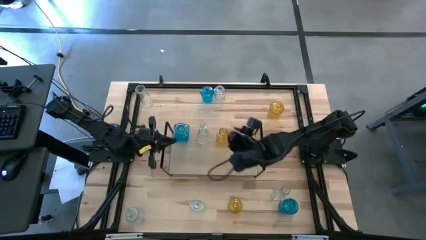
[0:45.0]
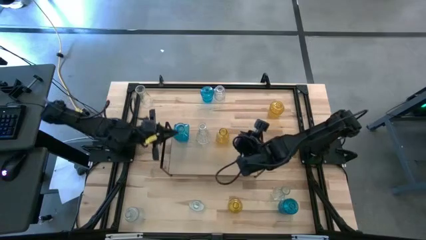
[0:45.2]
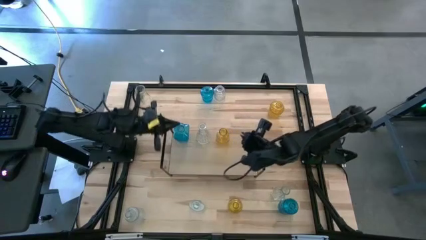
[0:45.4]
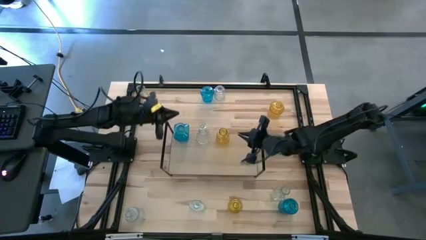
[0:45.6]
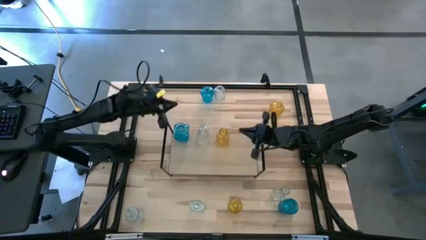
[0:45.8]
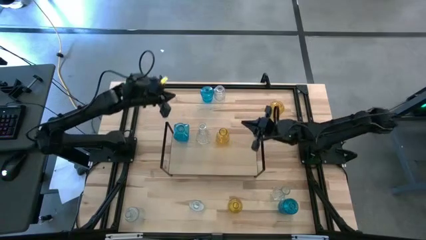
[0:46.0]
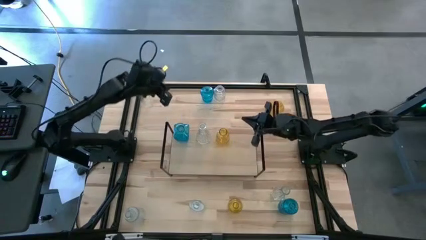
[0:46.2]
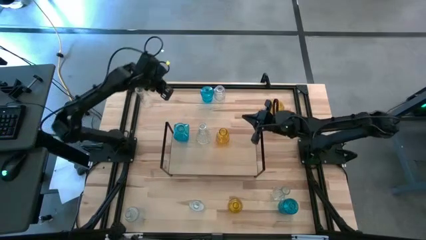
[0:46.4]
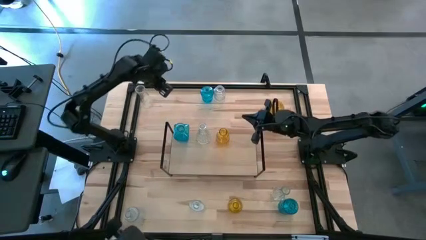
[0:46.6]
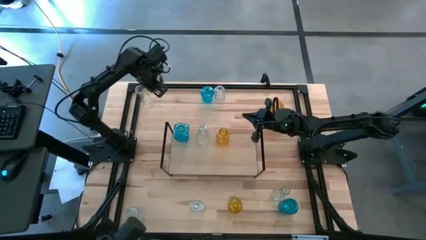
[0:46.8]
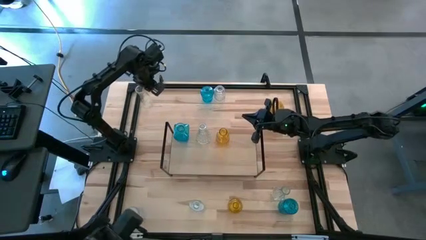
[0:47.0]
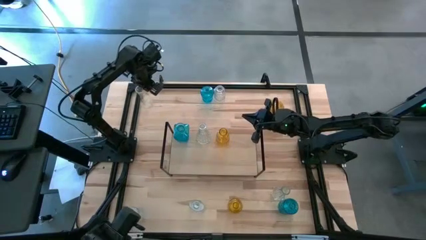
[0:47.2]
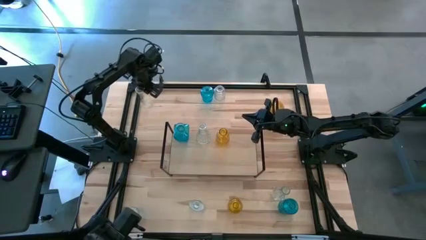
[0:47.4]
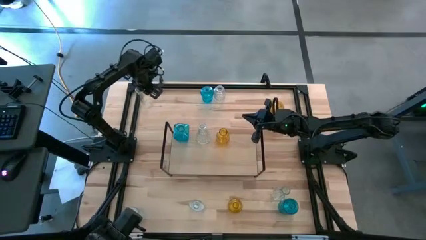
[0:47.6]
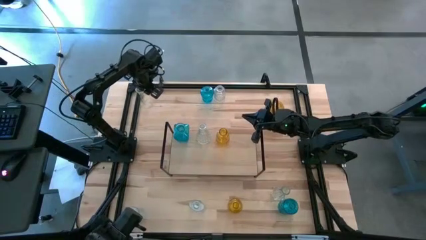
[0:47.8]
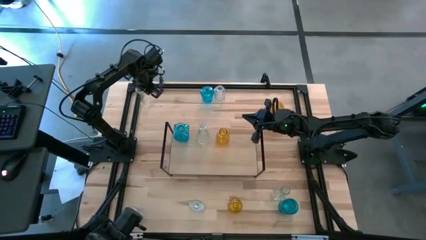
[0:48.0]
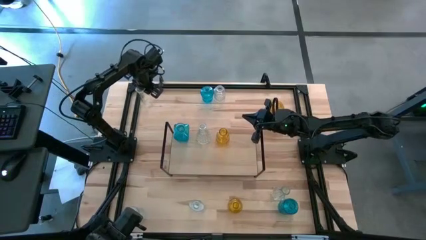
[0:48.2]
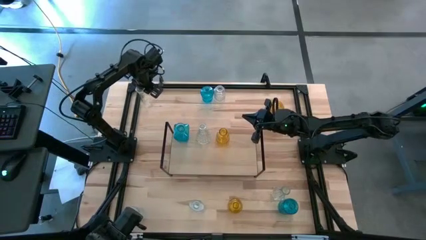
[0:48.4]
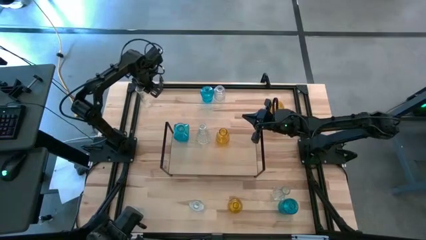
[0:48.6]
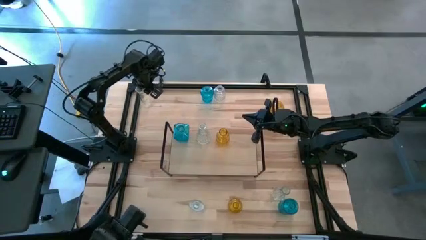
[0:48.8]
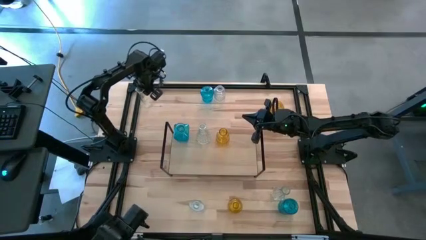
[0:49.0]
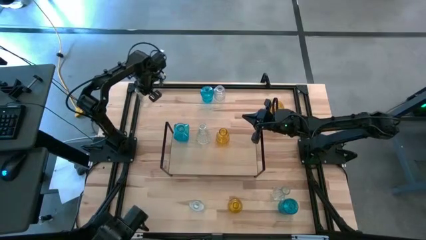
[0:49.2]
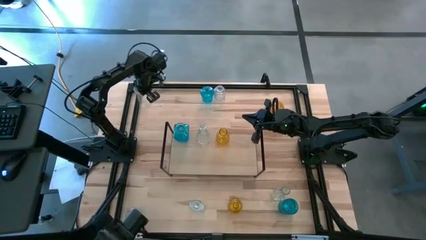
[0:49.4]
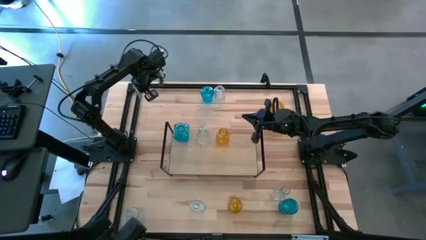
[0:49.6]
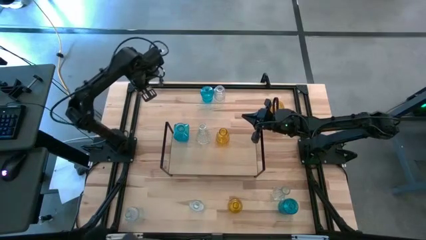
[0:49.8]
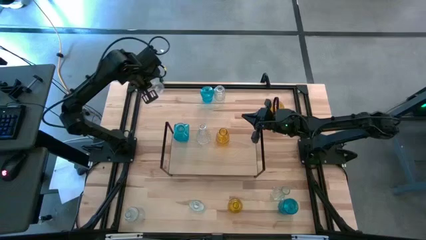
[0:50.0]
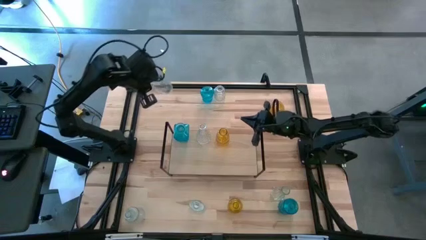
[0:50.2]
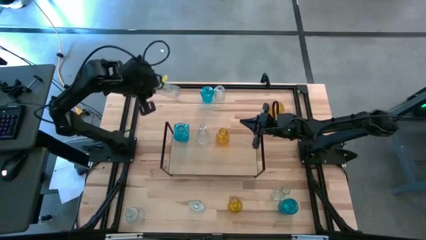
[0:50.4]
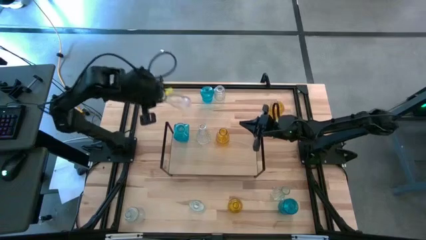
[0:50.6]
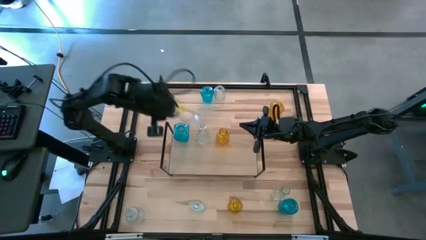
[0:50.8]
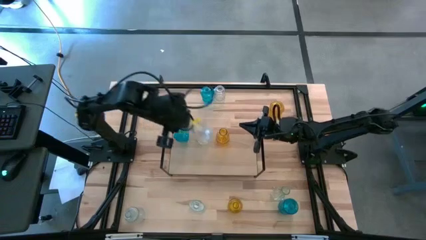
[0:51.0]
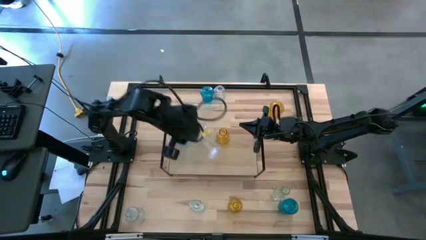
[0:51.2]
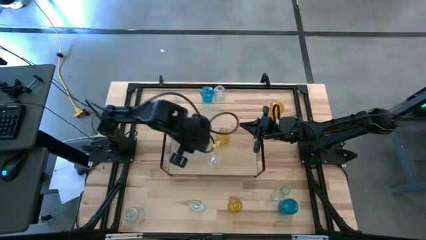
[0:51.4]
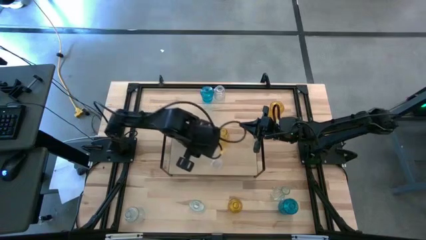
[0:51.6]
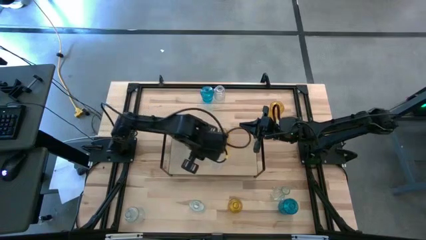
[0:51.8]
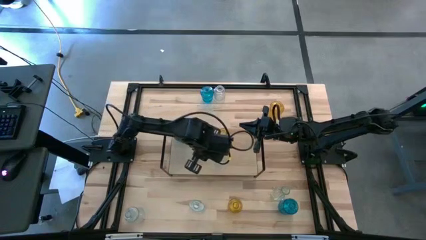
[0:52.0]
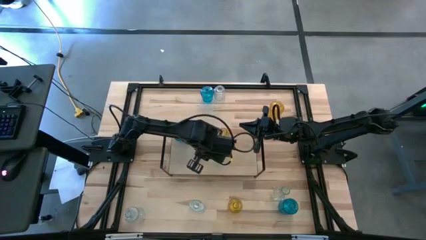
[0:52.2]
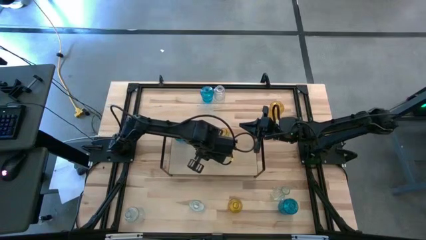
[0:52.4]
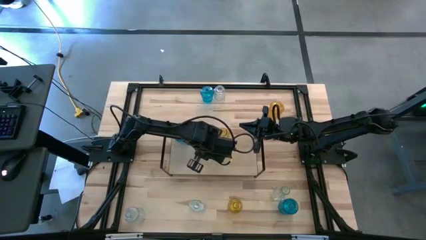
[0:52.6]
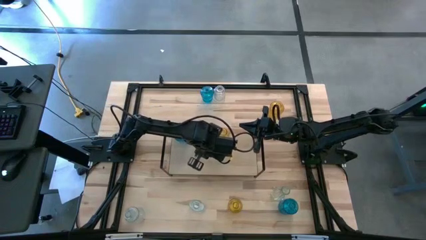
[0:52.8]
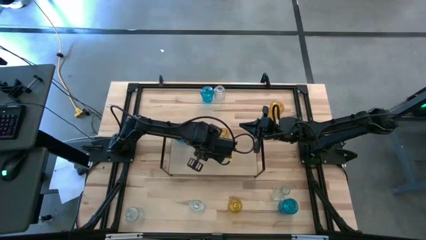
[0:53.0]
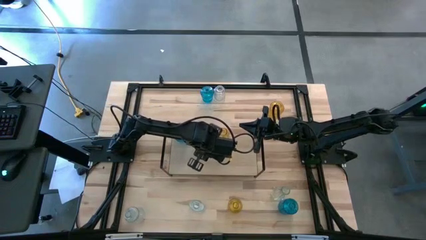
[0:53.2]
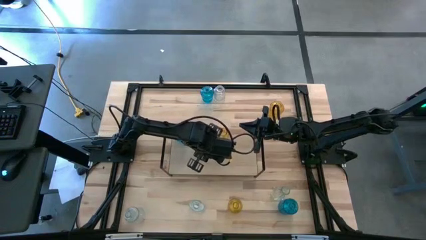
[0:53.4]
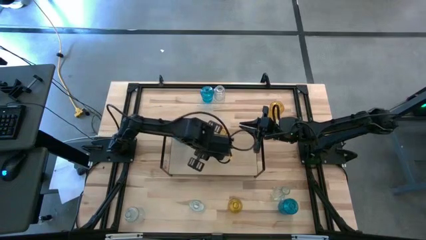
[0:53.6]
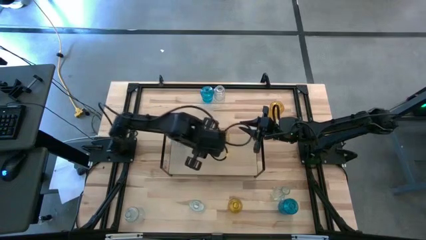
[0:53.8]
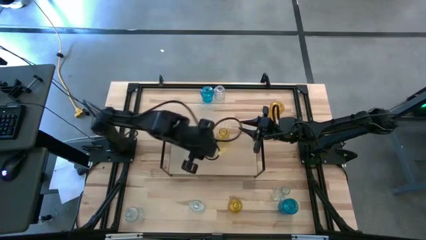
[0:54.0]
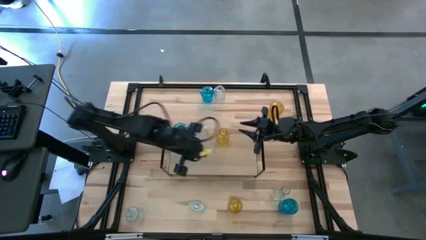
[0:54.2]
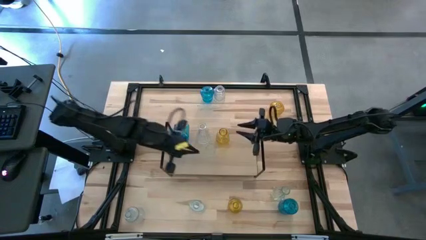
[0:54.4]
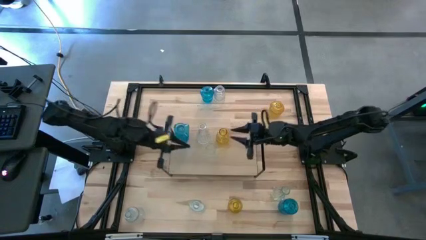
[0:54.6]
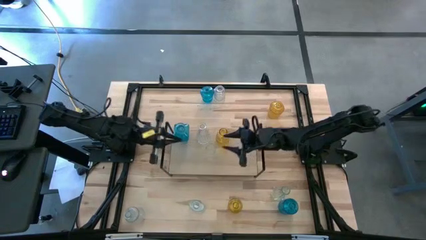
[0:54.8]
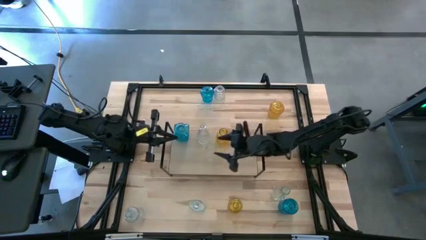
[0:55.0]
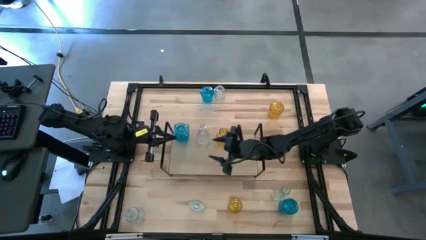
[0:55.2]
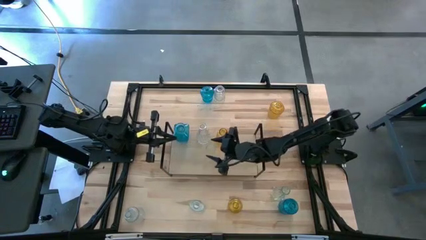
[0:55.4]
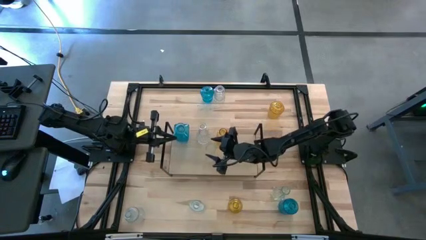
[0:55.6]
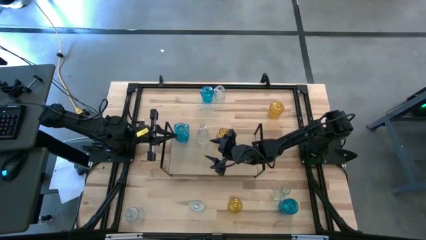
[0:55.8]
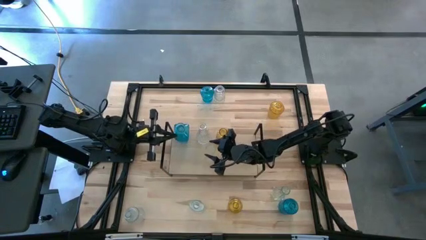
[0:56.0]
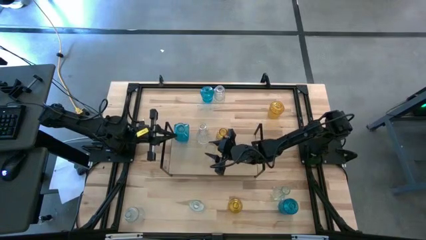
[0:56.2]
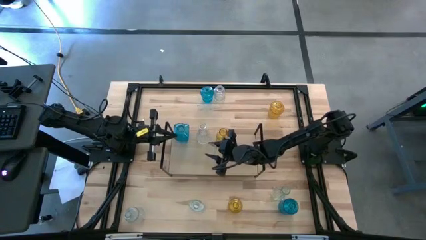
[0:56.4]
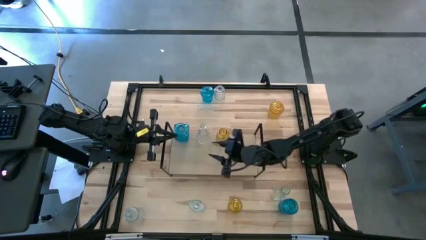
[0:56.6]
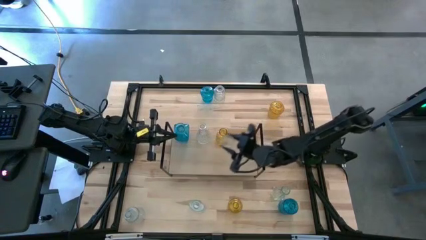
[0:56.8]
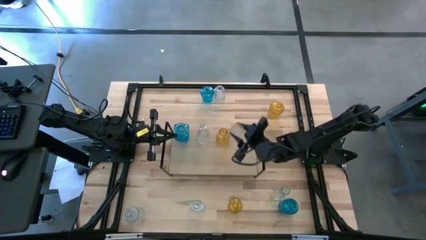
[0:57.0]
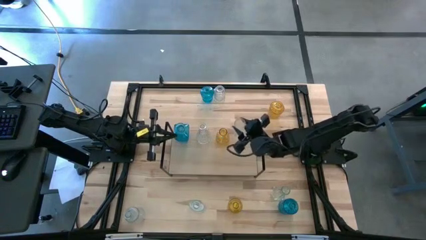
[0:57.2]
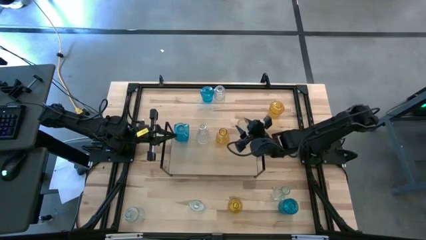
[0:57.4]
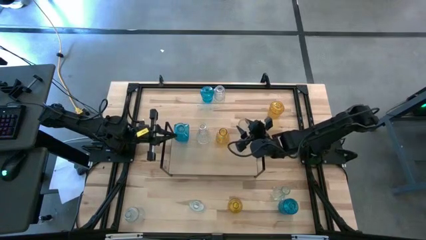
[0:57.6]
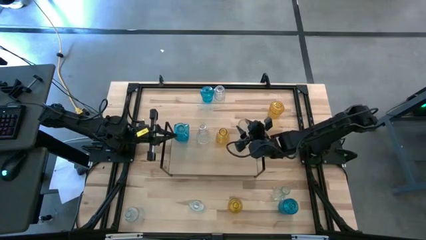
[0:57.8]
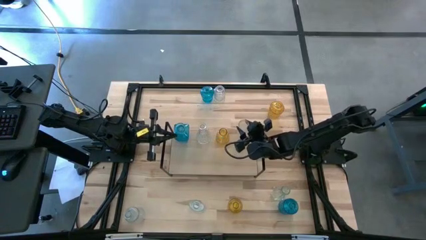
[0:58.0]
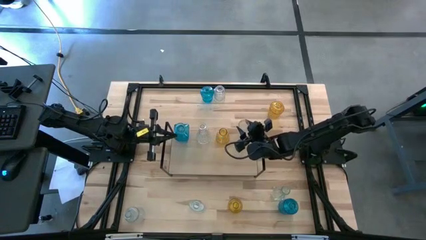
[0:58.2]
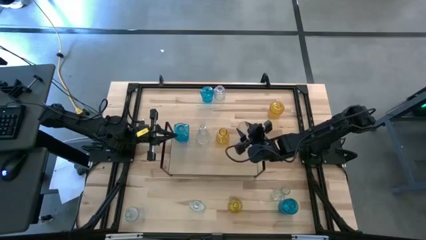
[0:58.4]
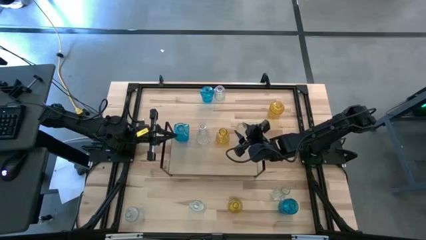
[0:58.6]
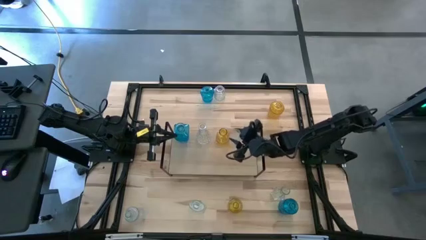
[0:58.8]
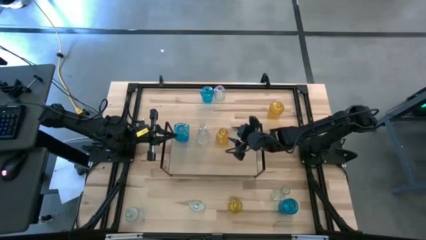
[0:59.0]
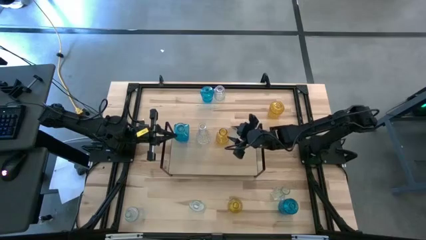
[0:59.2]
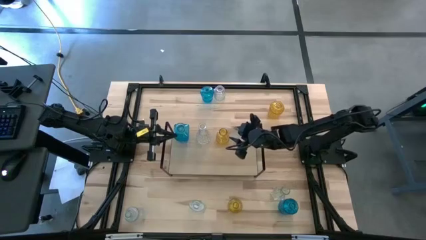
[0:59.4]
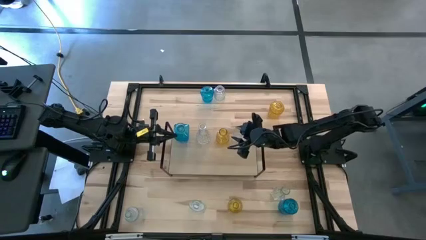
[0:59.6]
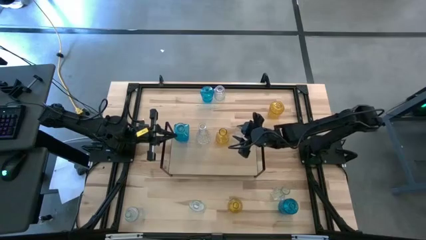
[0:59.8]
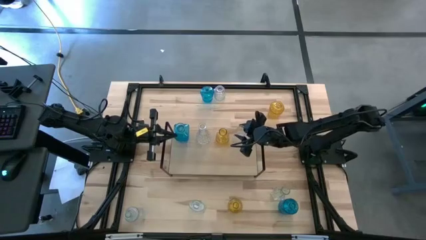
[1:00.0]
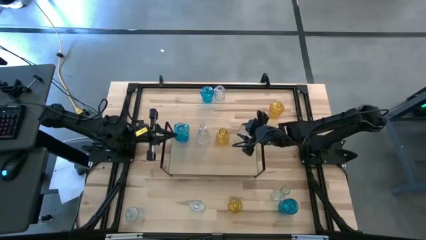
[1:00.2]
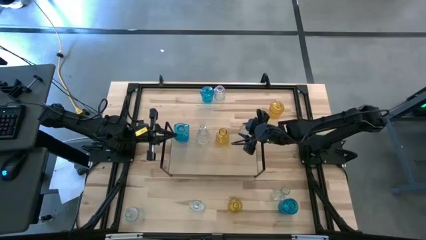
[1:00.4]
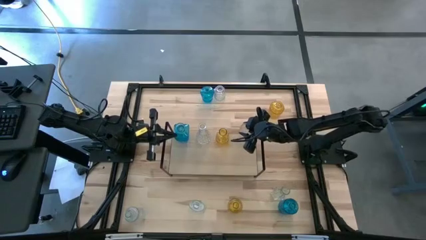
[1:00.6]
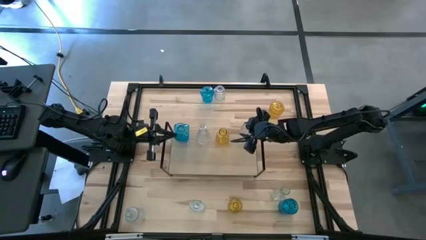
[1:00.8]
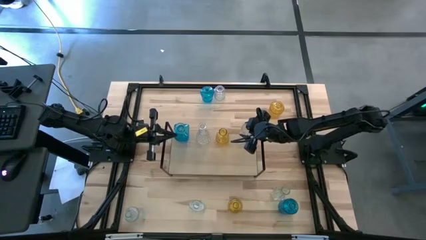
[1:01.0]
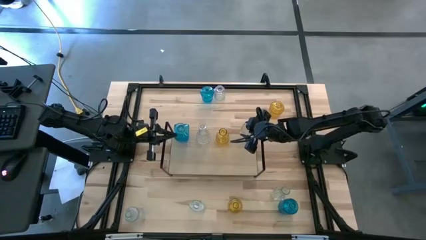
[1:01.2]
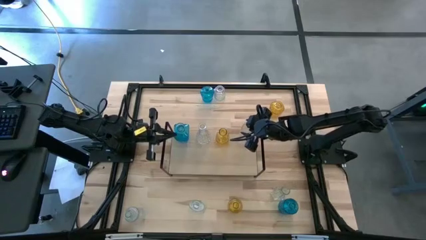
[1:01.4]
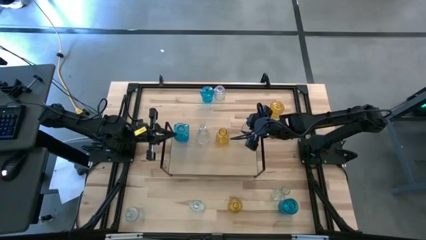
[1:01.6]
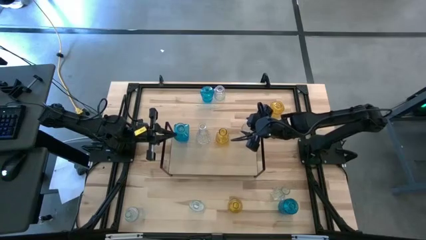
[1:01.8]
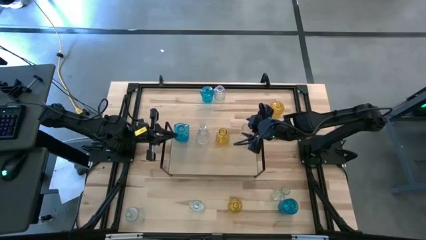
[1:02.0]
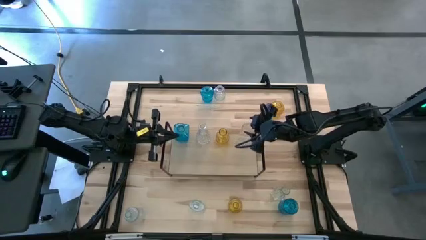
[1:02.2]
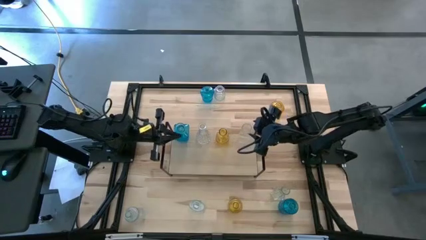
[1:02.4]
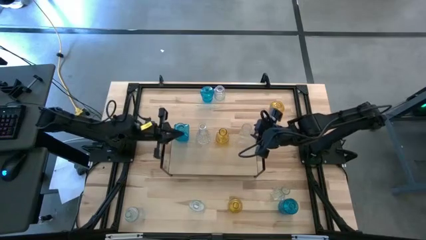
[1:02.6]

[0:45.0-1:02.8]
Task: sort vases onto shelf
Put the top left transparent vase on the shelf
